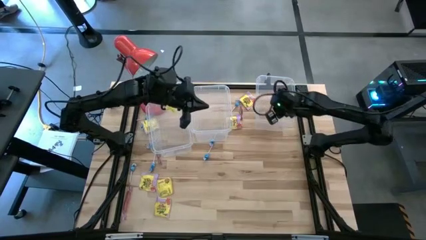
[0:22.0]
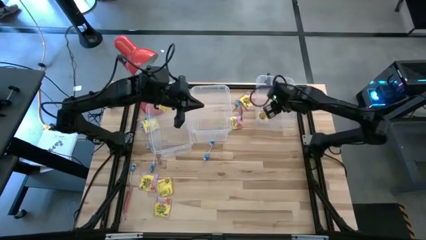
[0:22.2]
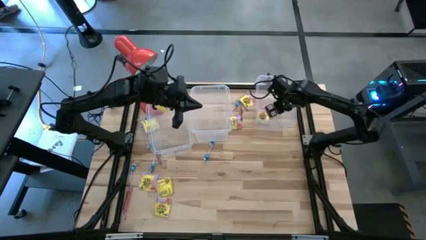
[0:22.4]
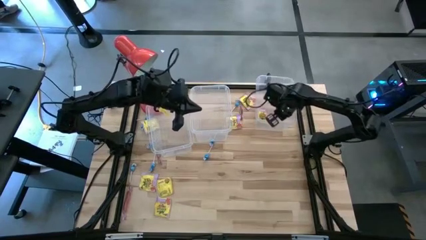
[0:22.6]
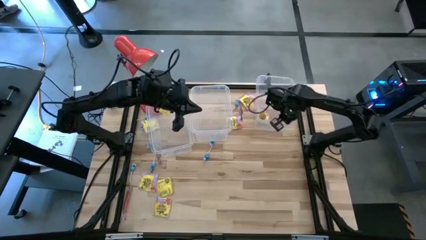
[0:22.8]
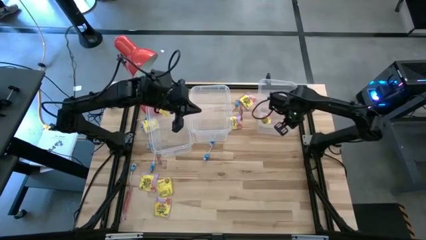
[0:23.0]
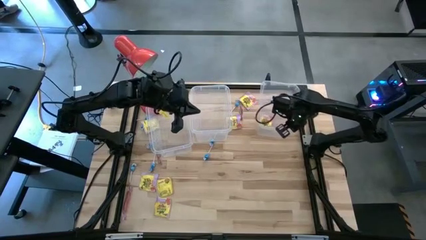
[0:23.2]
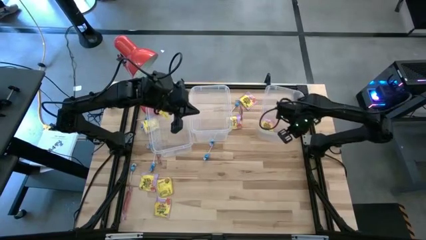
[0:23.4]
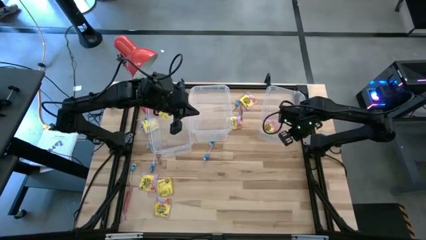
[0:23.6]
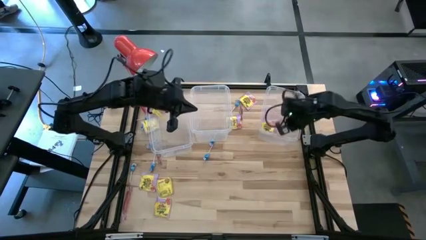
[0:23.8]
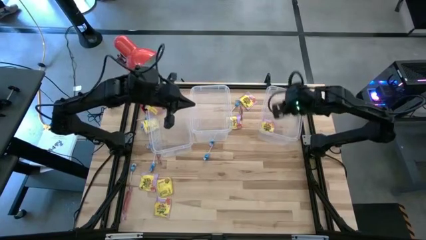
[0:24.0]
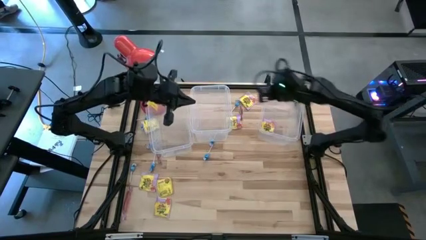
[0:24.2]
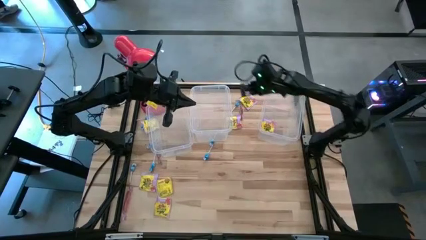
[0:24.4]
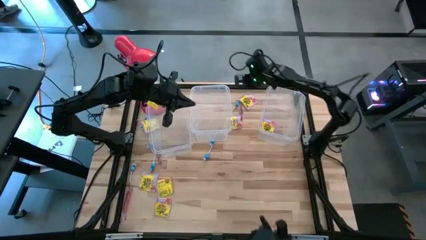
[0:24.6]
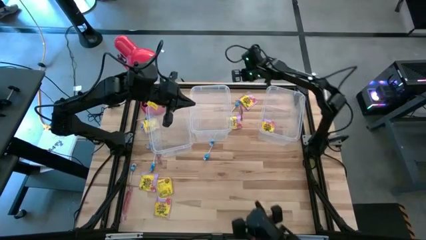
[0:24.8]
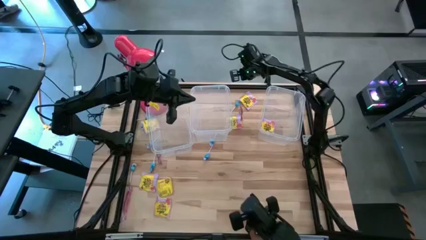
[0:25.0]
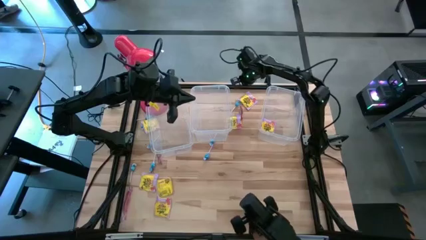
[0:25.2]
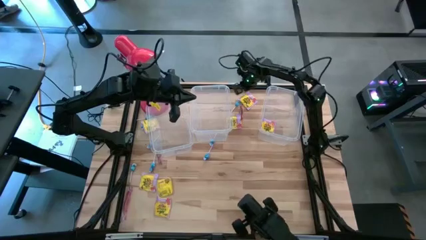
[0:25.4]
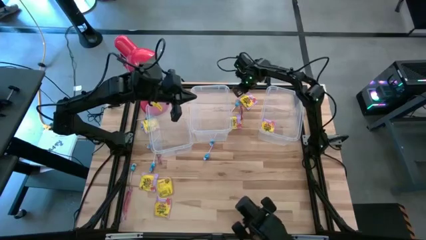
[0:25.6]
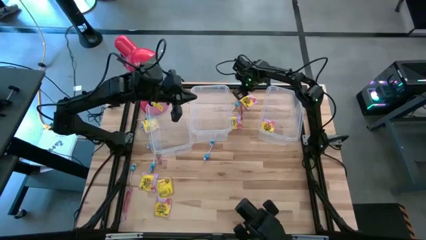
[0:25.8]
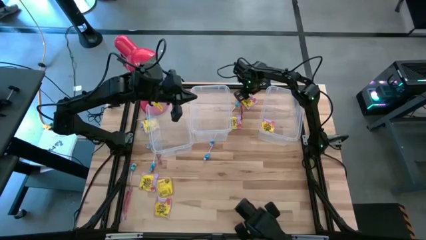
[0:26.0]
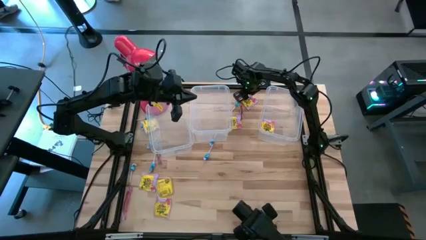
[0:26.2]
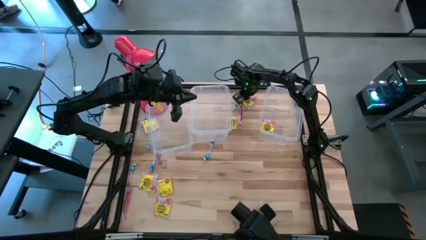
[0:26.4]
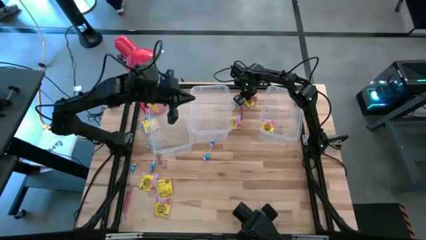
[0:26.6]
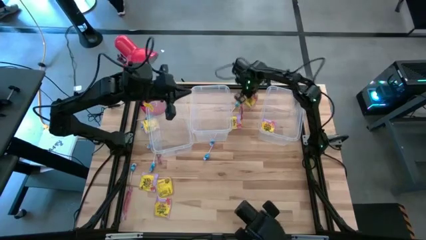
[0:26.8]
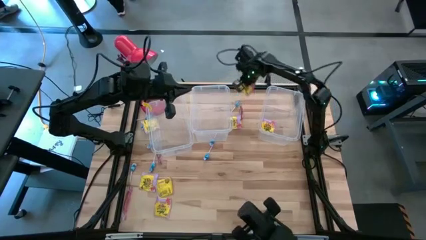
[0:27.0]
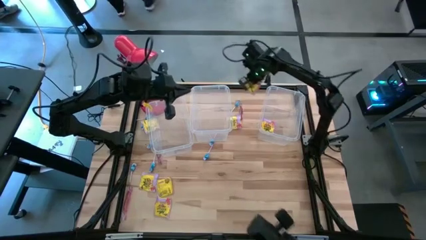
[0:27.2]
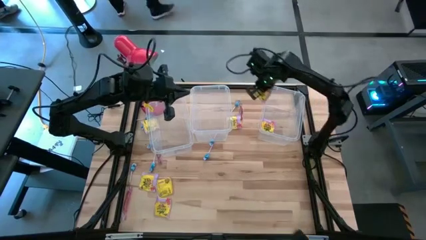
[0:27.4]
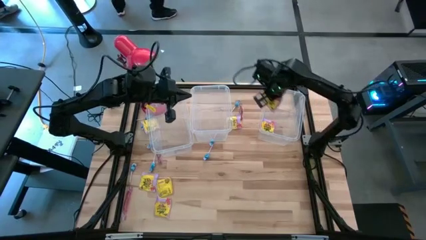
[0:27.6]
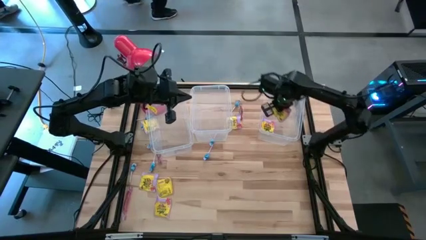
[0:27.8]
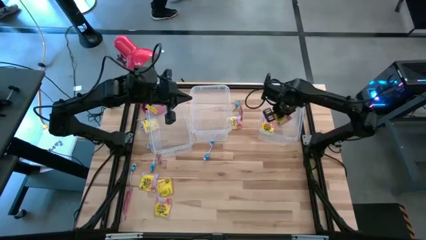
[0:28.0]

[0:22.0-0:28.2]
Task: Sort candy
Put the yellow candy into the right transparent bin

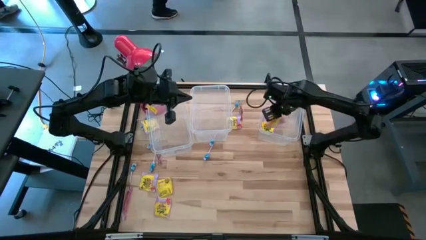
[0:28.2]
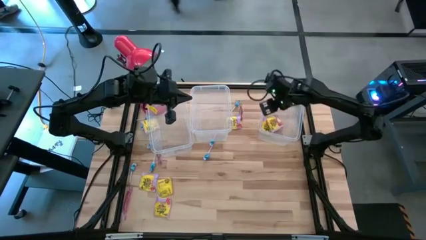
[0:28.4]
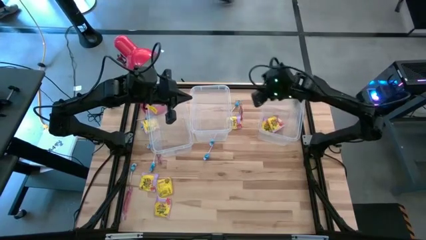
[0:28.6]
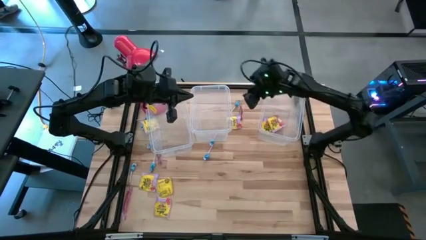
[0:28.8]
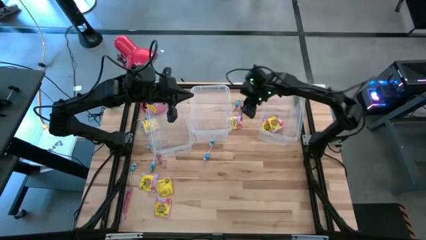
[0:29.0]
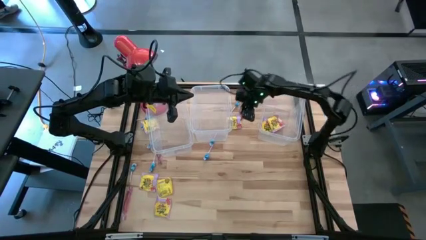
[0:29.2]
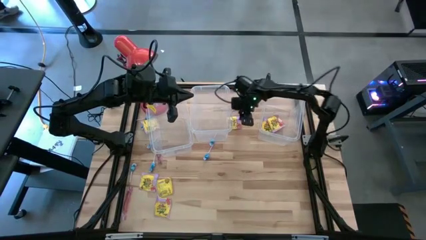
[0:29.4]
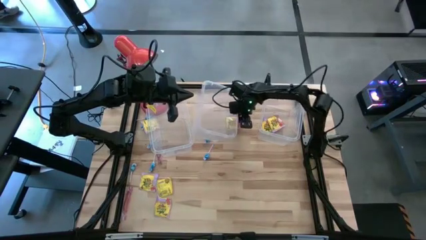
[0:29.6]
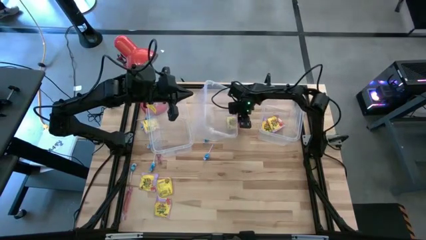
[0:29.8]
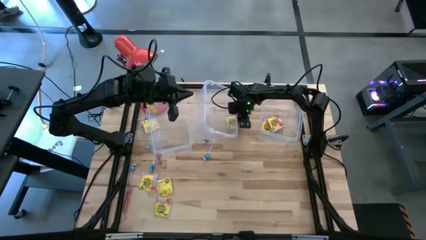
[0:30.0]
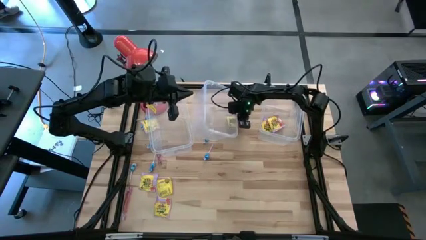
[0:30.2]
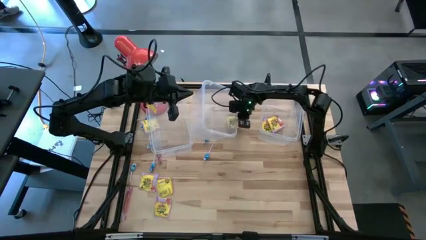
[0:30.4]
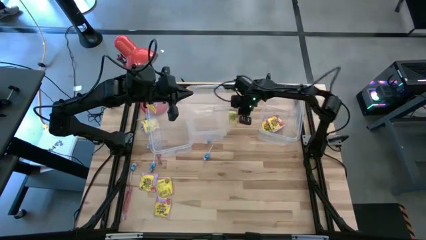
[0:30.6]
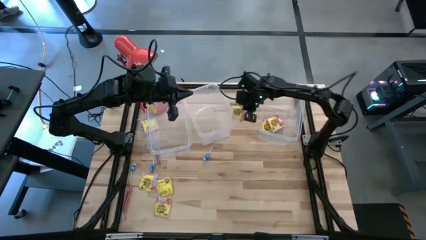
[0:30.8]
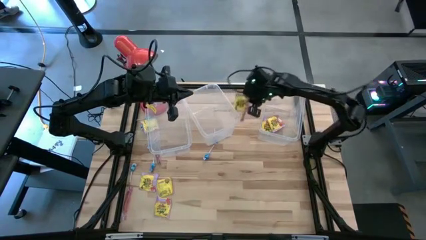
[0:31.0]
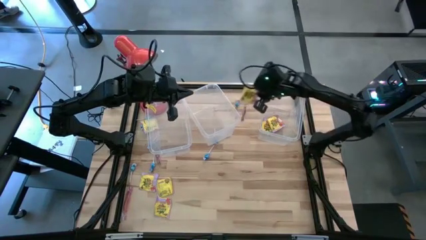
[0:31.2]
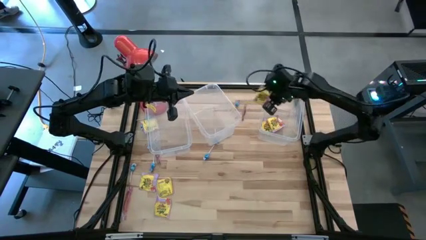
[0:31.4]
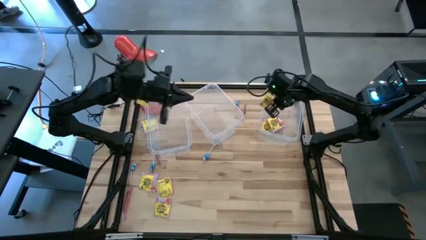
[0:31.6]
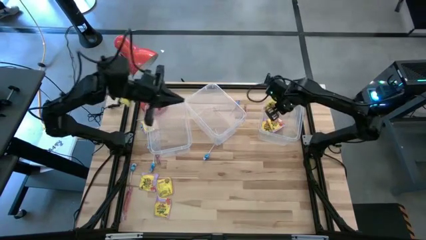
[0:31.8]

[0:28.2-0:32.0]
Put the yellow candy into the right transparent bin

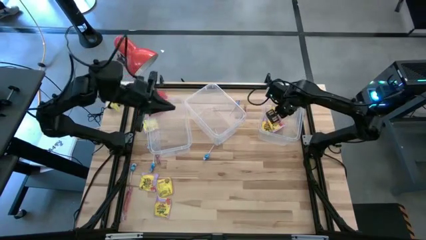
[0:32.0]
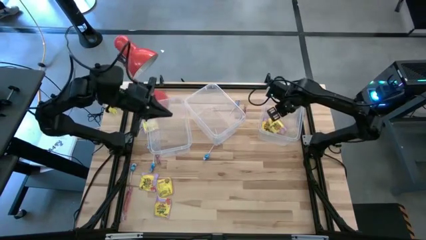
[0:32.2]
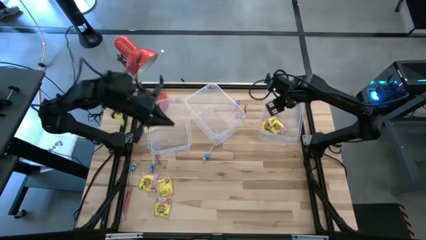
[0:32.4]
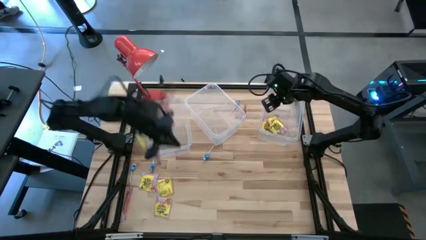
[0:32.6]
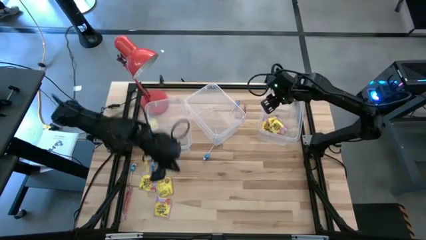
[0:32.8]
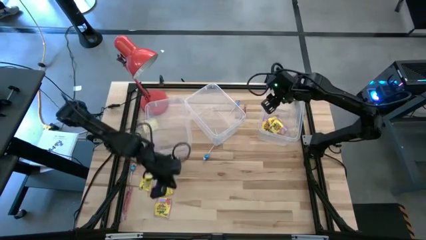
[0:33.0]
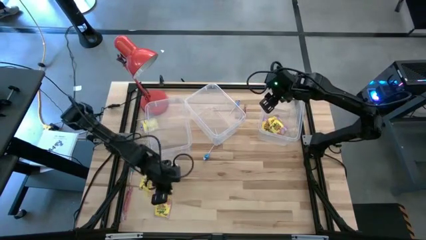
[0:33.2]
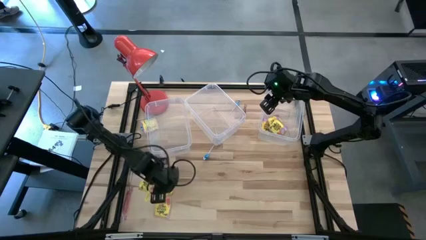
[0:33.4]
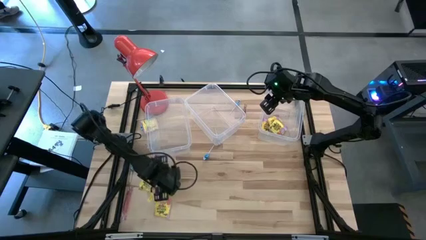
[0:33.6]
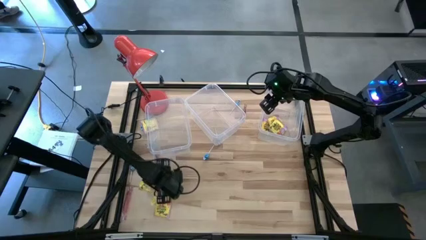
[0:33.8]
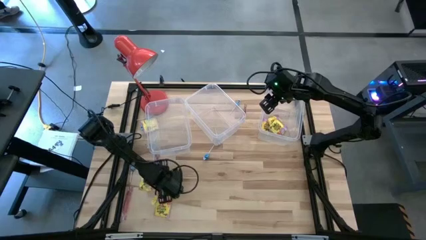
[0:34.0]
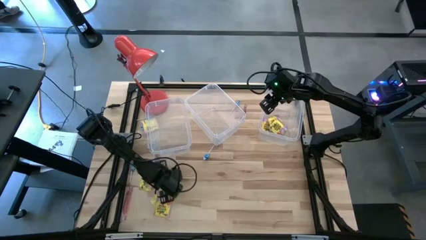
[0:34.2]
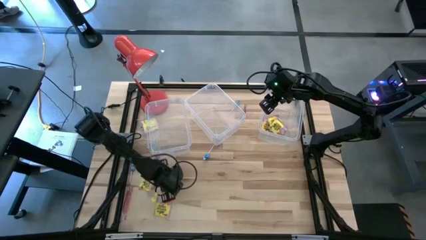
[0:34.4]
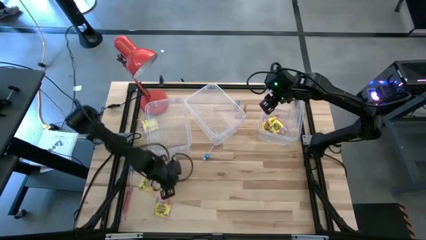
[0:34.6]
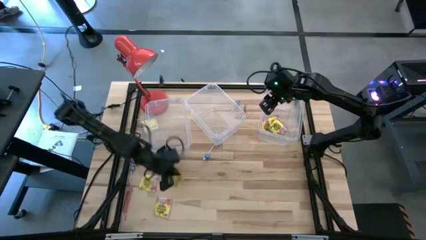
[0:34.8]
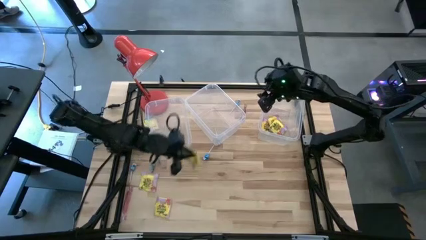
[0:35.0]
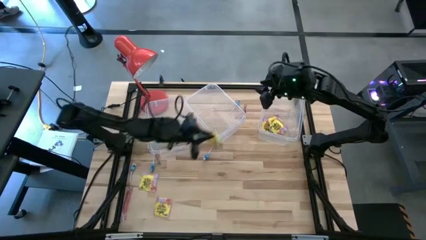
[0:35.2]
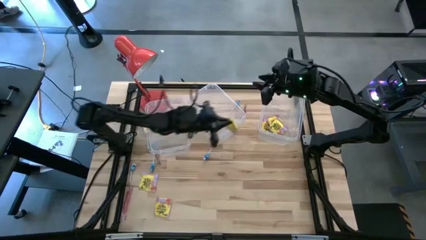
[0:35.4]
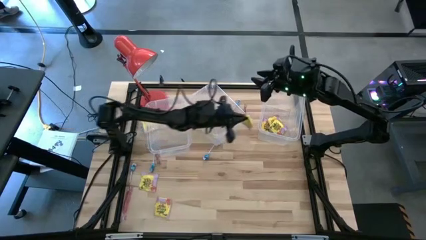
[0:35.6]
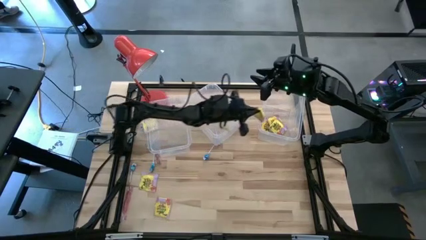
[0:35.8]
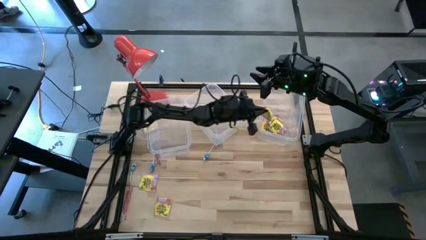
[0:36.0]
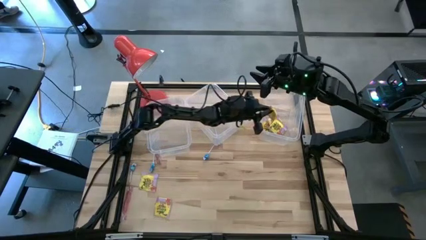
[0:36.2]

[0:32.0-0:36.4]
Put the yellow candy into the right transparent bin

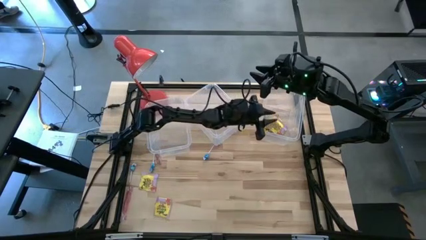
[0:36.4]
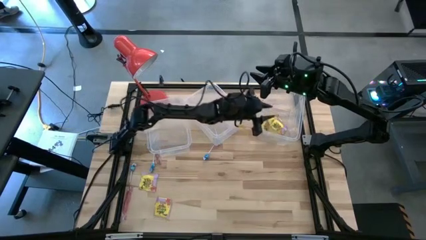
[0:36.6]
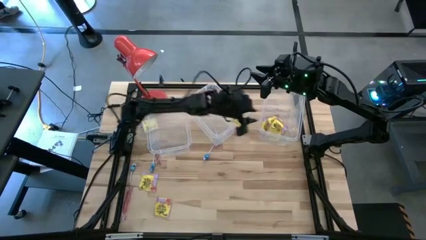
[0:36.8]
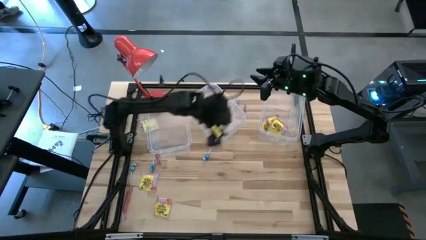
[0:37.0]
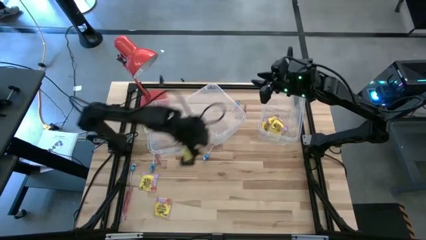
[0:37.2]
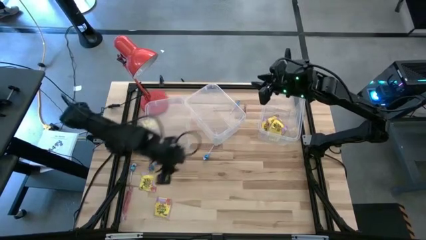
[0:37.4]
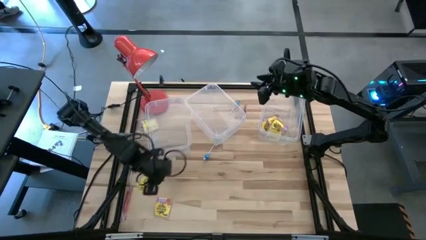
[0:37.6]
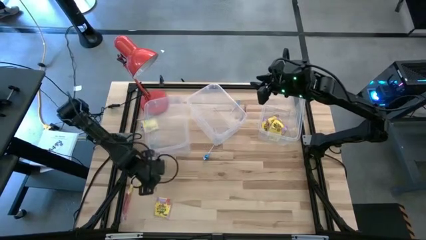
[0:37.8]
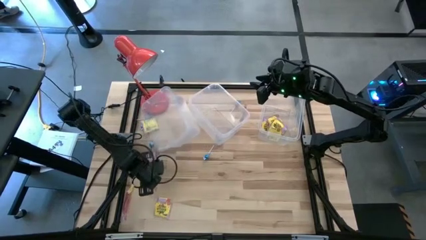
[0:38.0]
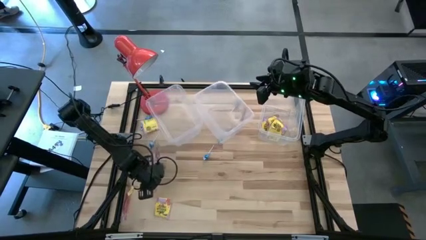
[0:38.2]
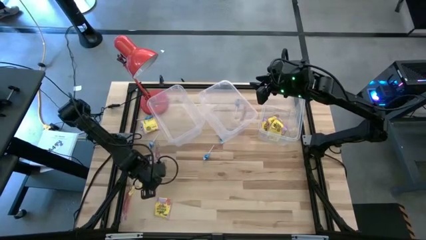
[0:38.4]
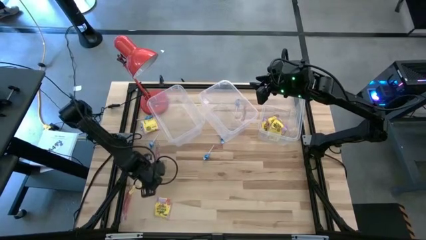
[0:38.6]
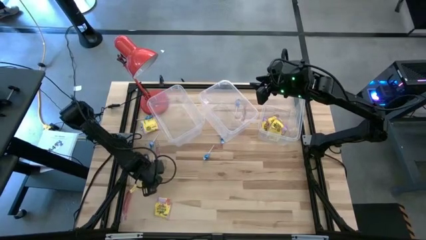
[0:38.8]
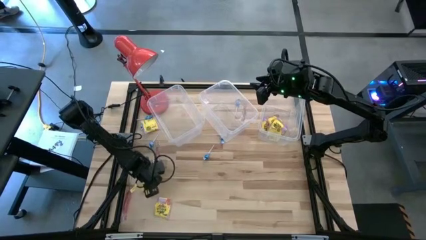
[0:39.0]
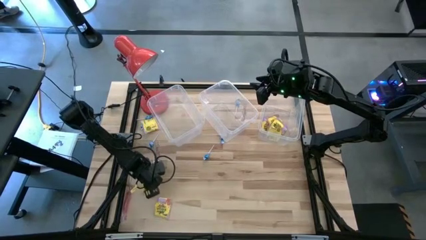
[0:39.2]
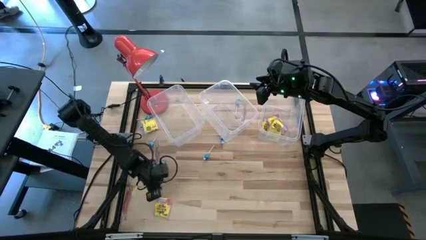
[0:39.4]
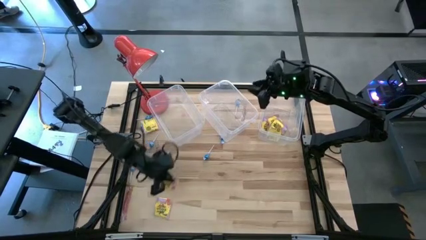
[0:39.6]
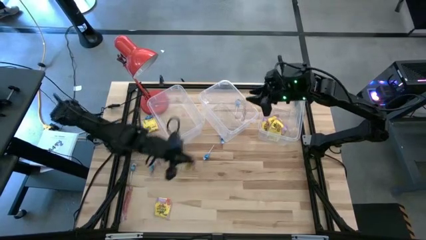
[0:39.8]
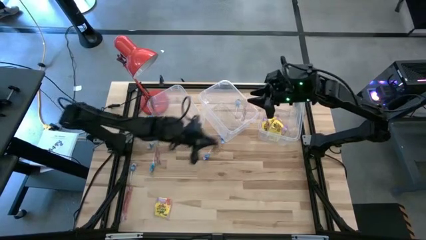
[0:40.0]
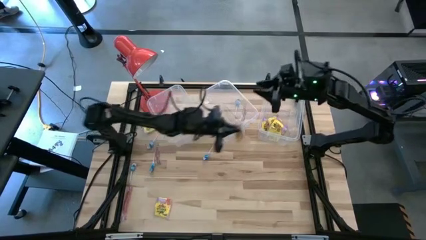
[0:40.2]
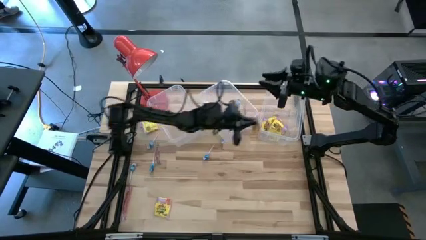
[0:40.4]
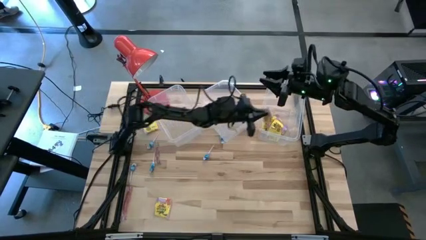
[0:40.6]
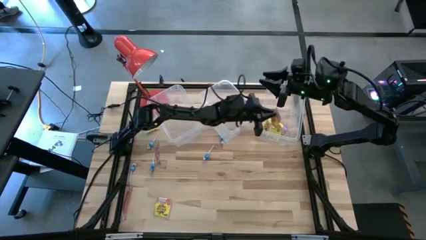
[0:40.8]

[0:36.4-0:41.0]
Put the yellow candy into the right transparent bin
